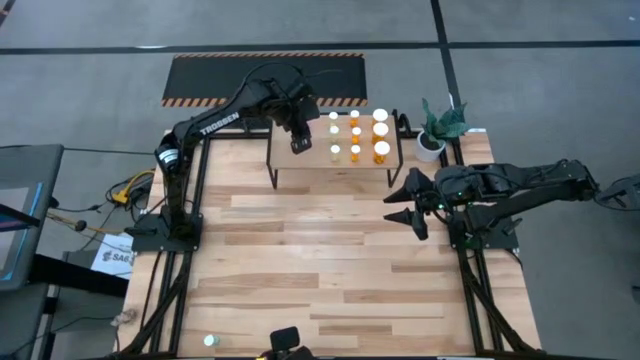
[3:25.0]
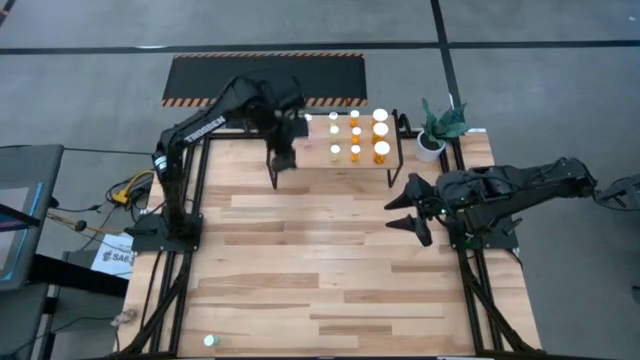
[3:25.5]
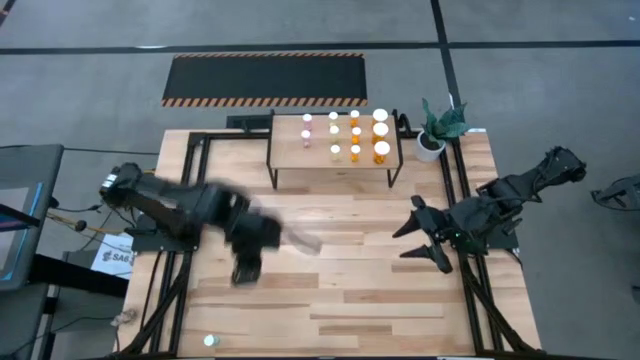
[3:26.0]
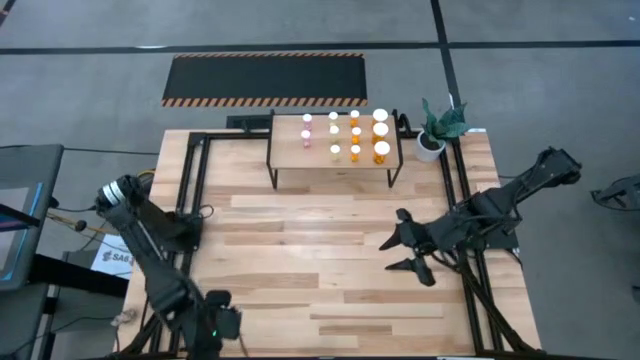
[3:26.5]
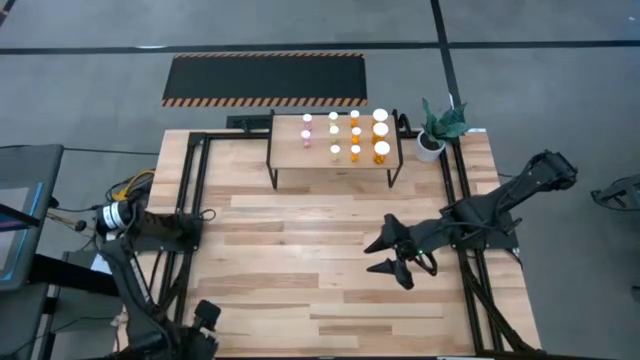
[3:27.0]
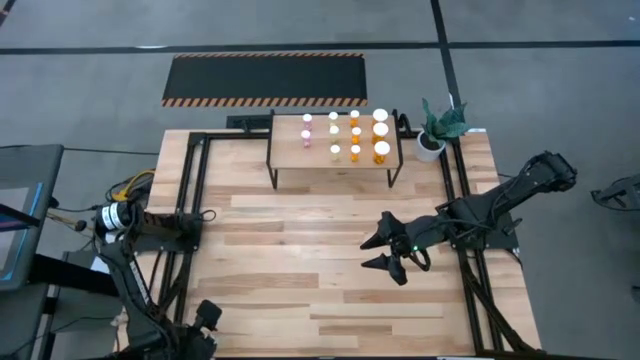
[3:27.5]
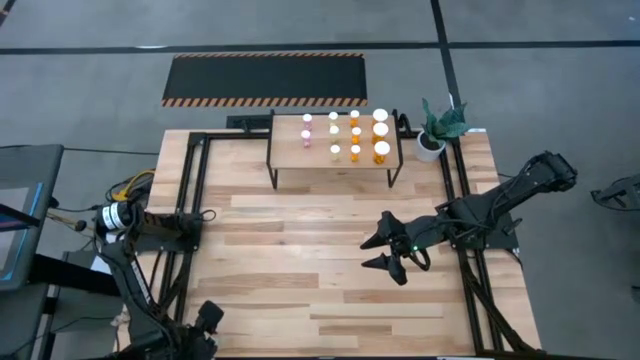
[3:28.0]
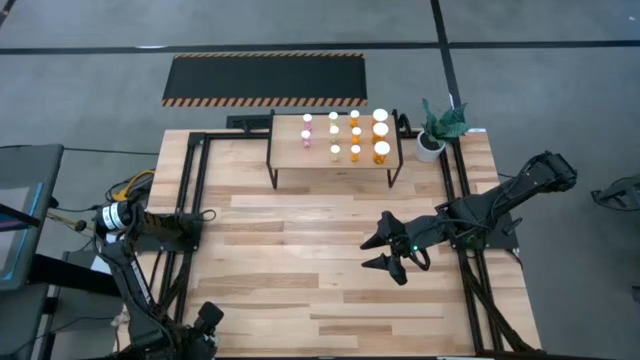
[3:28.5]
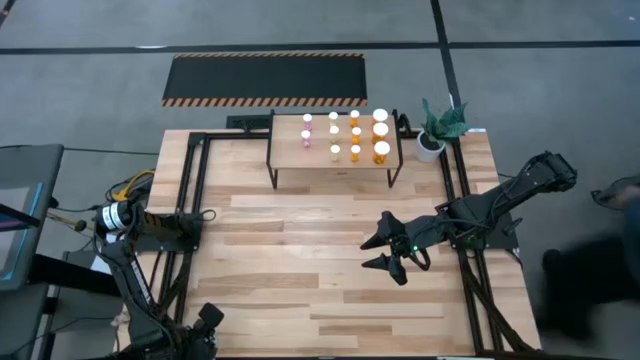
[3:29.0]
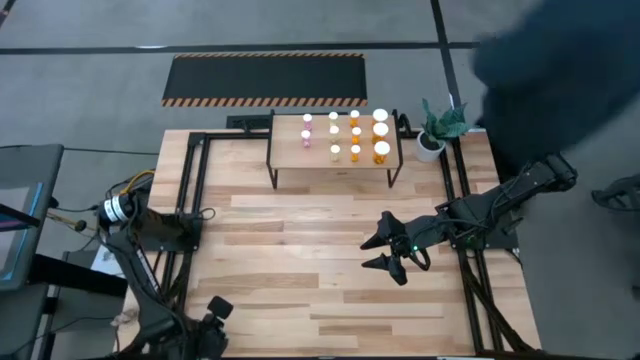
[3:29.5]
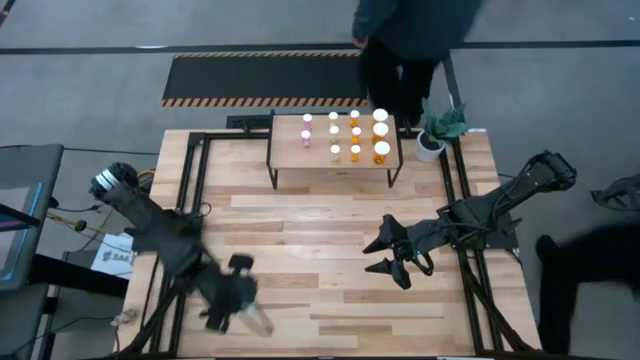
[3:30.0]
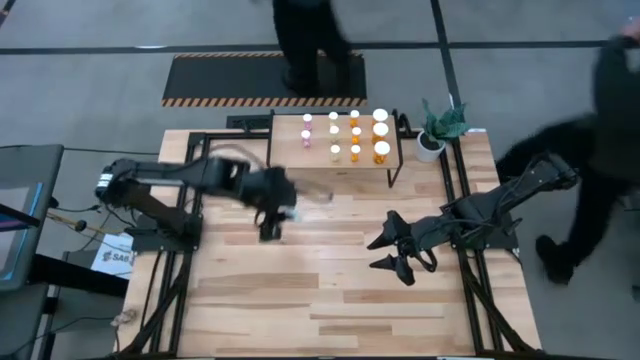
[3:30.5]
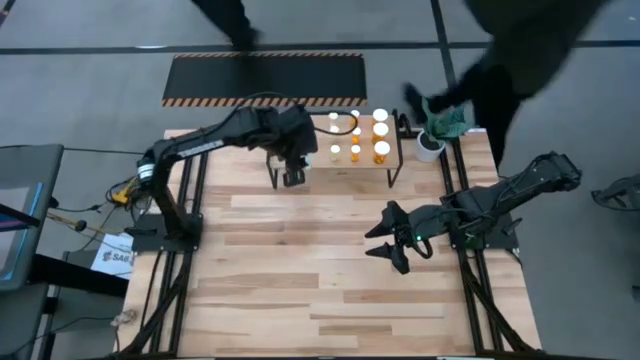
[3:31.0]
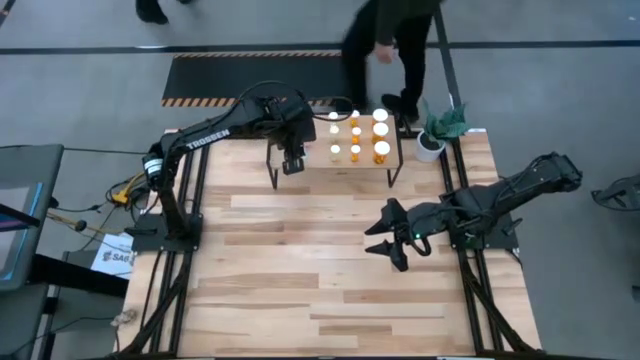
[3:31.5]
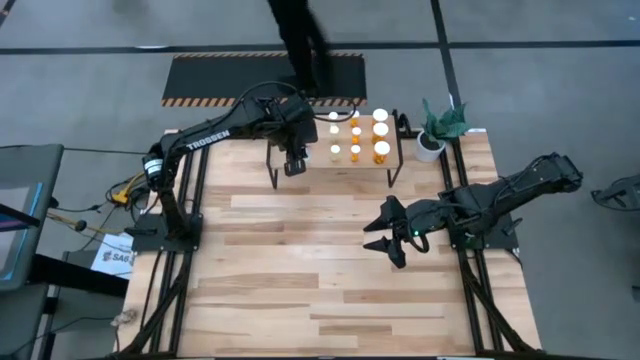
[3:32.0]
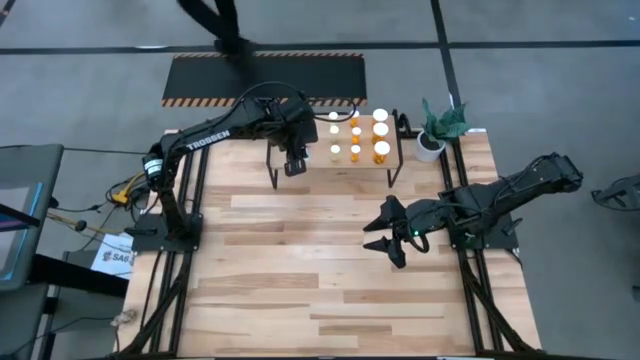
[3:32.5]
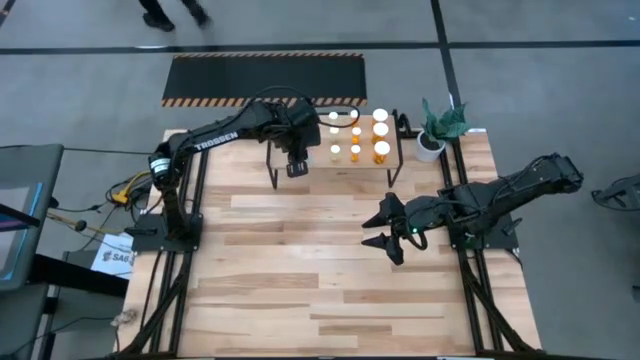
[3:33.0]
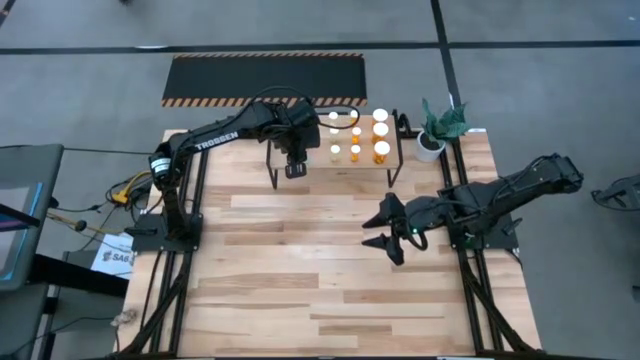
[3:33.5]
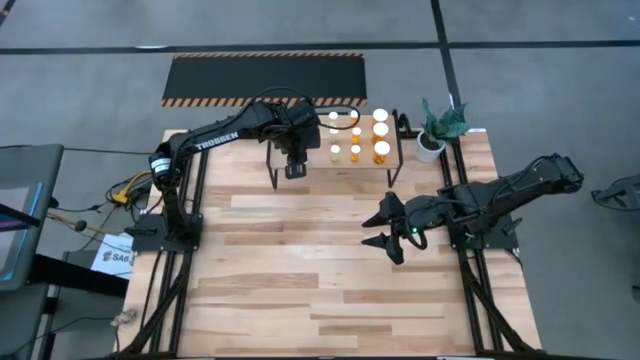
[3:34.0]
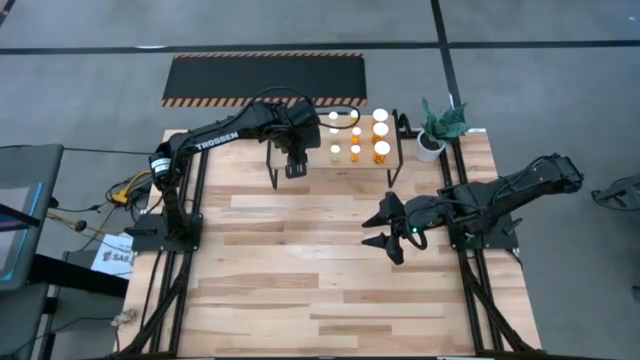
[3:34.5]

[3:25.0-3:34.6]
Task: Pick and place medicine bottles onto shelf by color
Put the small green pill bottle on the shelf aligned with the other pink pill bottle

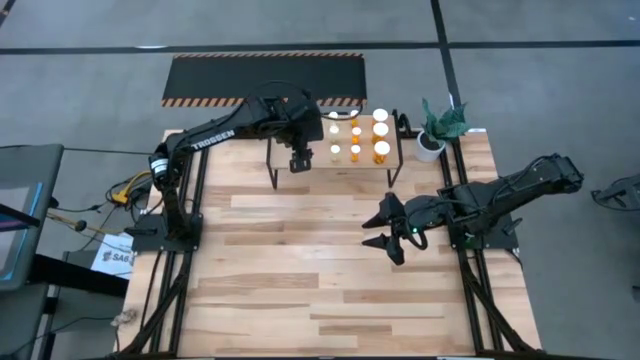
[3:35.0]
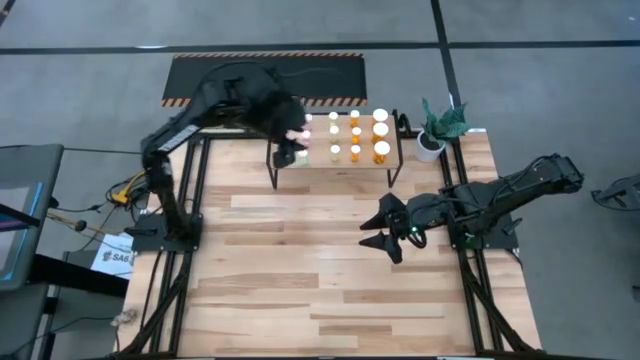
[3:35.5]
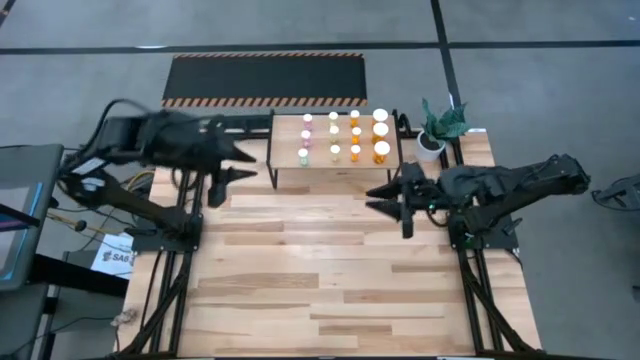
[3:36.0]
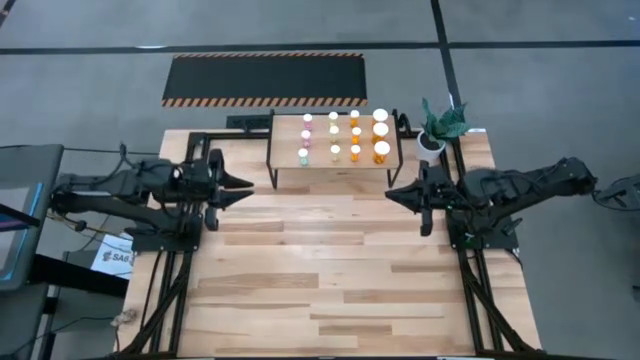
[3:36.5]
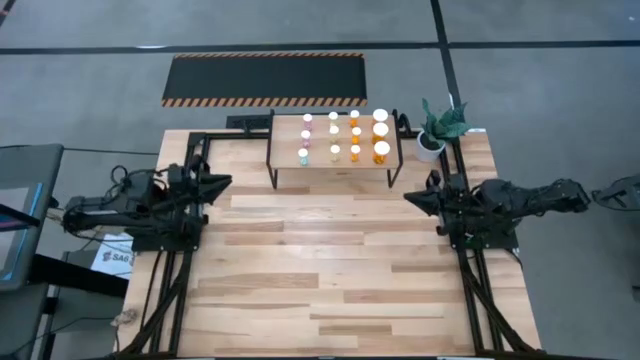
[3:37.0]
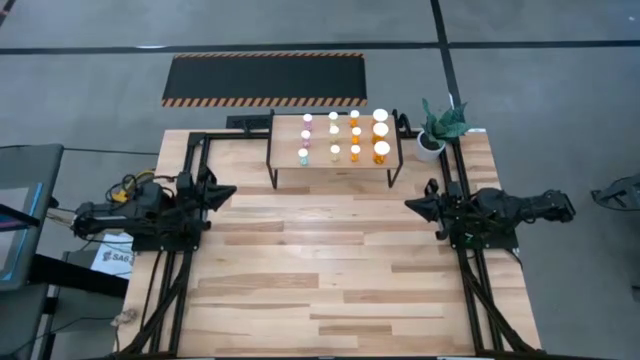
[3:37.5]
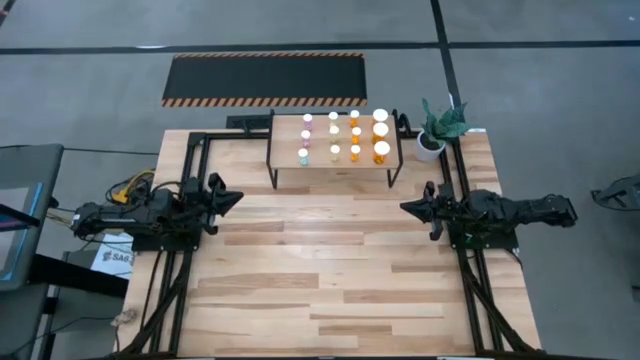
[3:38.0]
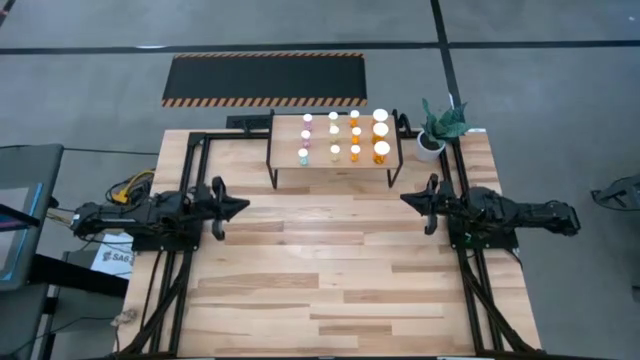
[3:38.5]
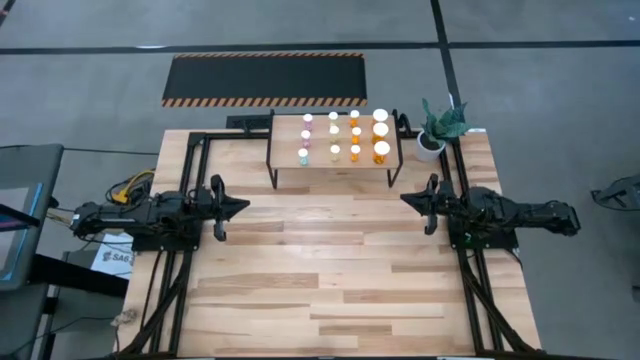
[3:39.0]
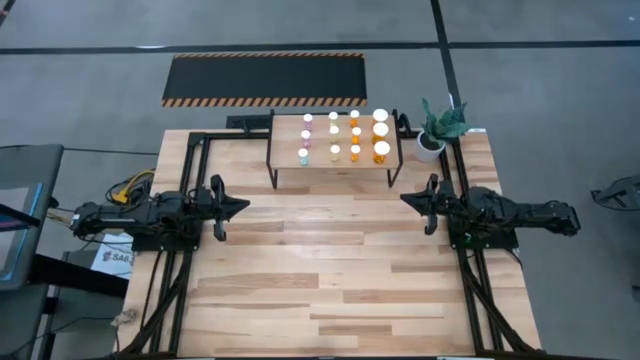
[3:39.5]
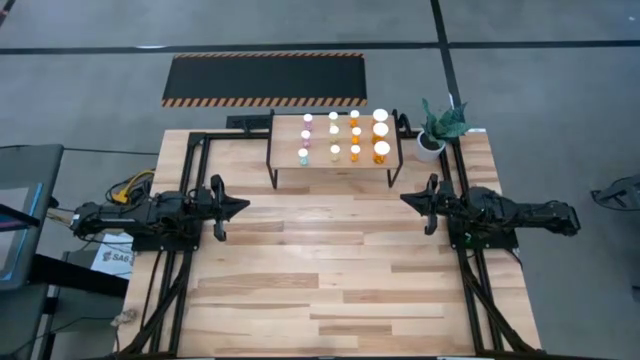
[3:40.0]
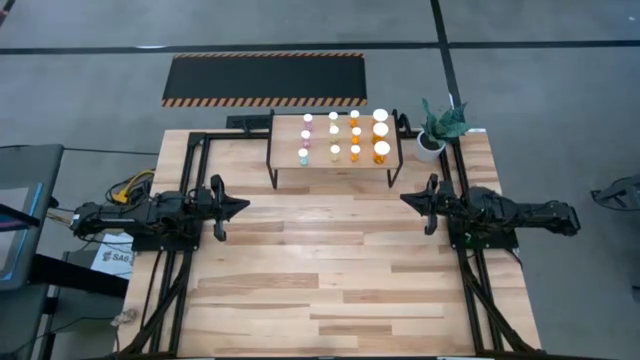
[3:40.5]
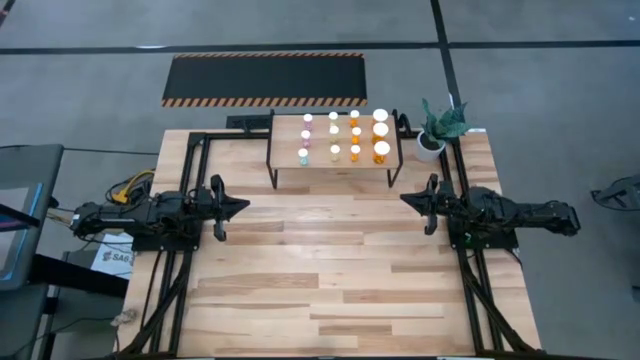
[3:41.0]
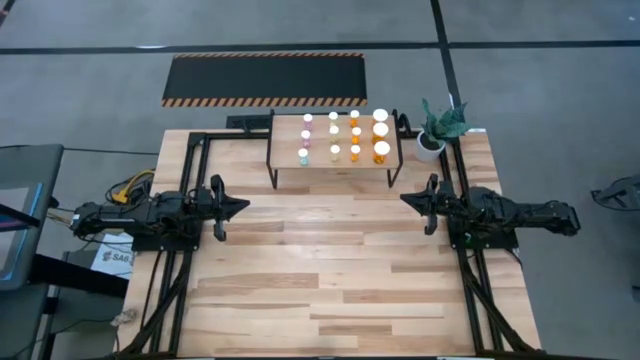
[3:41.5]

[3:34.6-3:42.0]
Return to Home Position

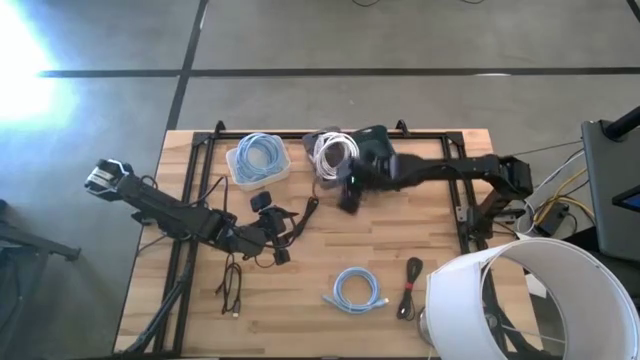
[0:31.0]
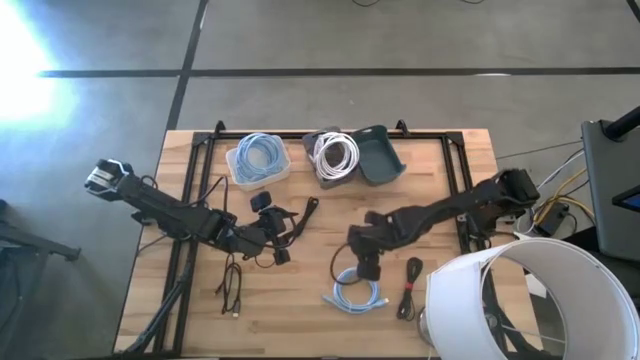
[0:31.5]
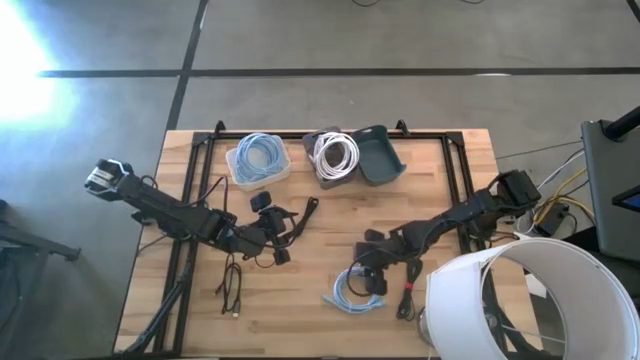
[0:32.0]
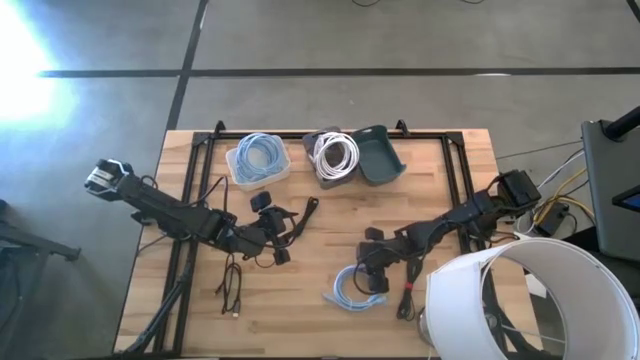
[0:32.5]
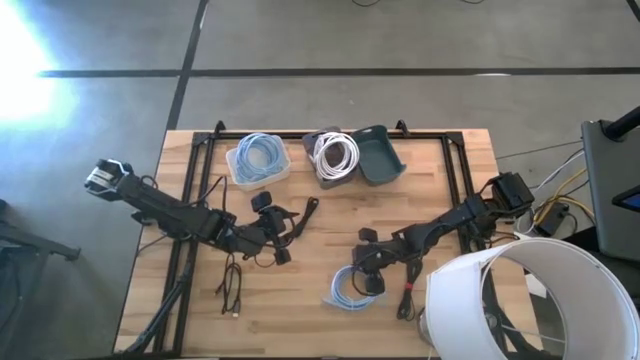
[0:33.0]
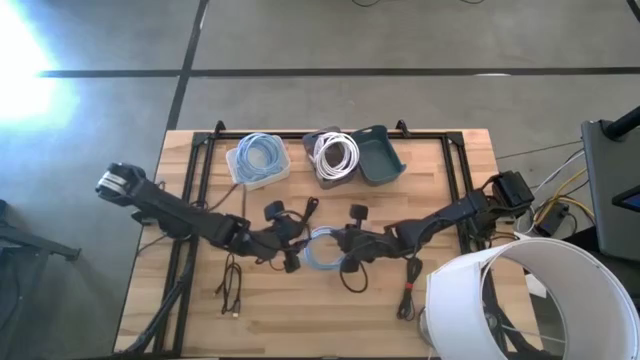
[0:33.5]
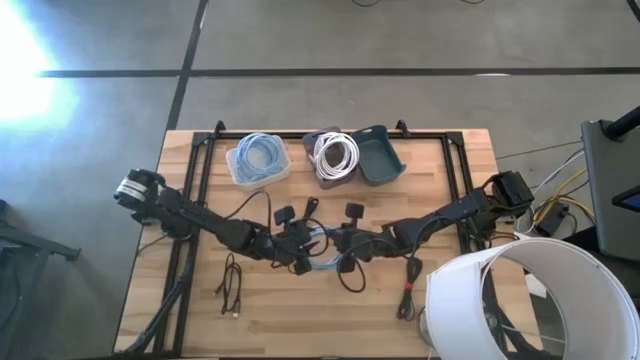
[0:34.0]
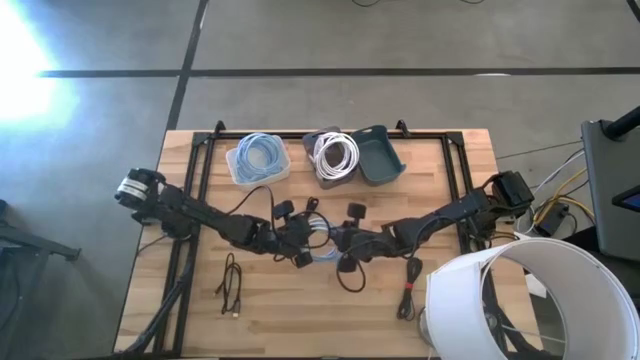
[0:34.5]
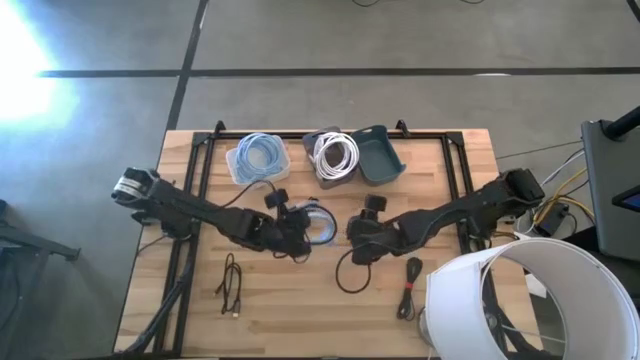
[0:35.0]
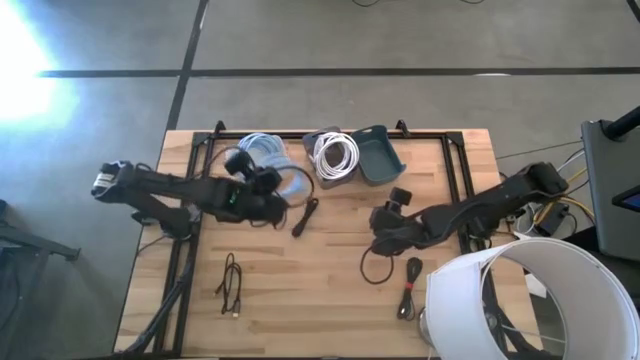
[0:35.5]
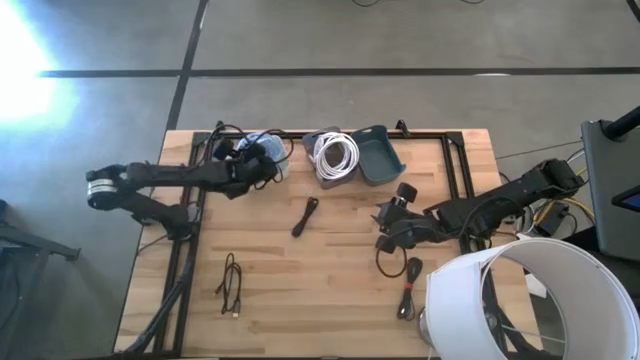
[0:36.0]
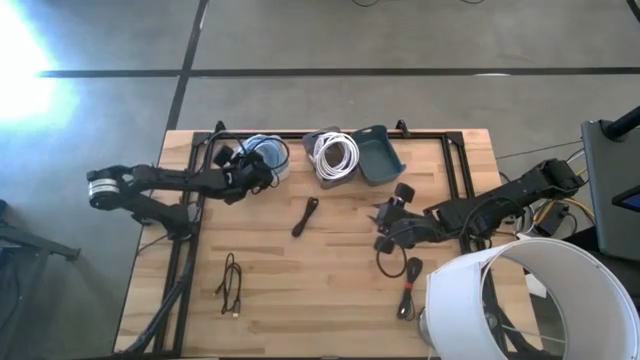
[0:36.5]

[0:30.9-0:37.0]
Task: Pick & Place USB Port
Put the blue USB cable into the white bin
